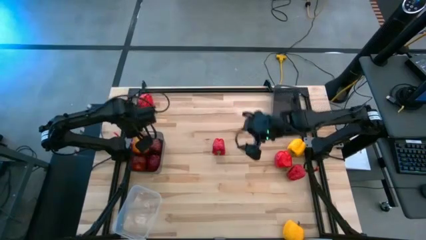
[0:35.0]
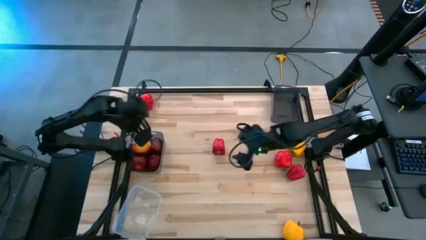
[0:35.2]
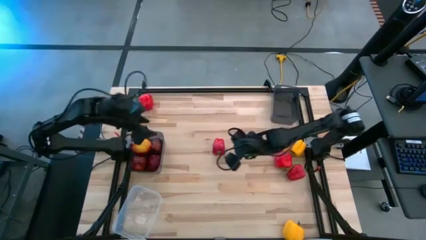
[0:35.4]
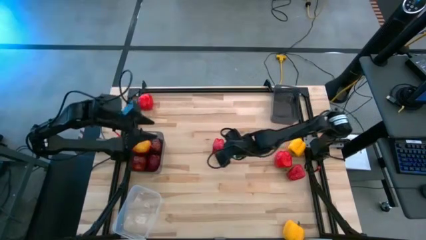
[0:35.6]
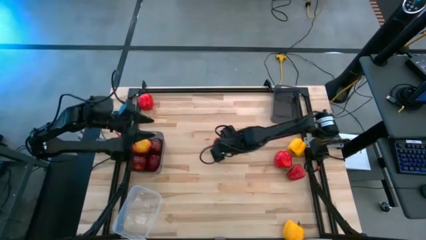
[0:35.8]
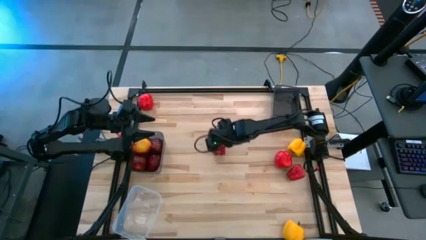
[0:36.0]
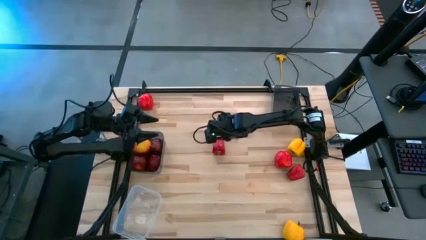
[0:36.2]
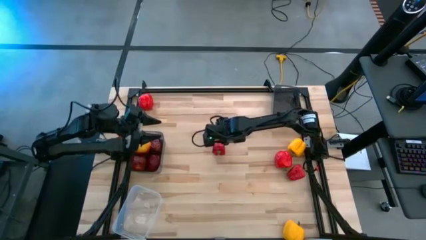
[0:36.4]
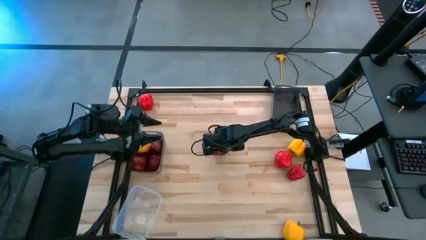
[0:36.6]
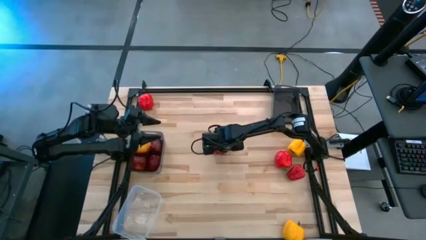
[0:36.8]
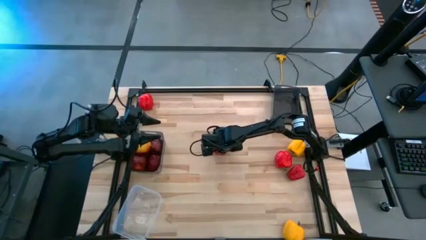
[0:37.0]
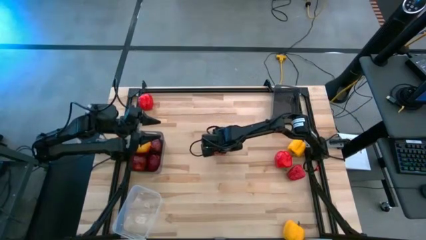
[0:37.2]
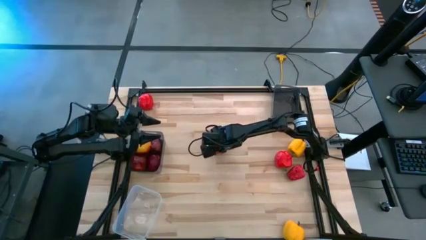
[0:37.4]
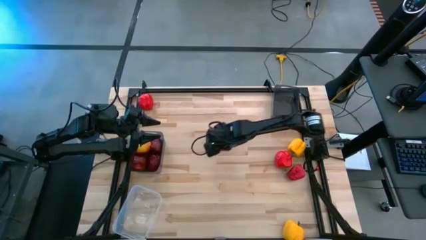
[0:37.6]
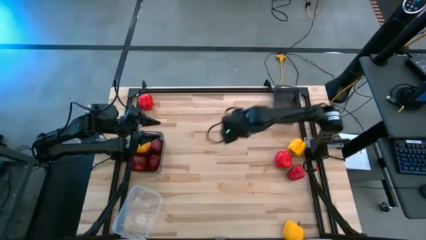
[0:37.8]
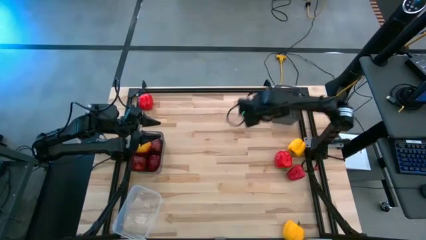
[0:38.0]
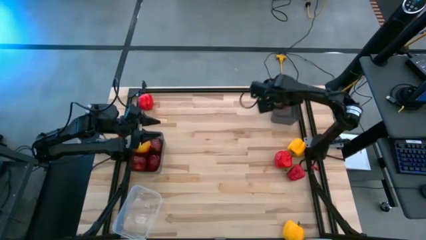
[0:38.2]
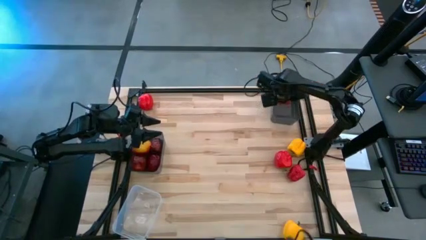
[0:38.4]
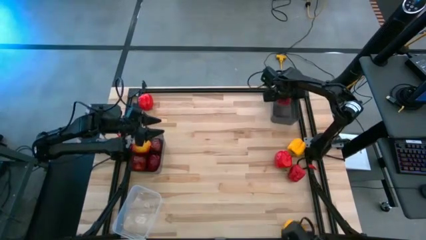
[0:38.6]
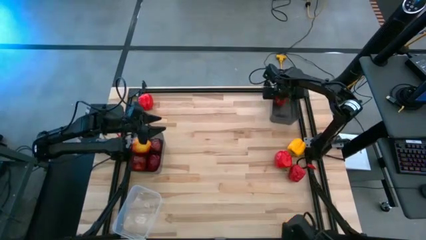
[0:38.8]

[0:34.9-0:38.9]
Task: Sort produce into baskets
Put the red bell pepper into the right black transparent bin

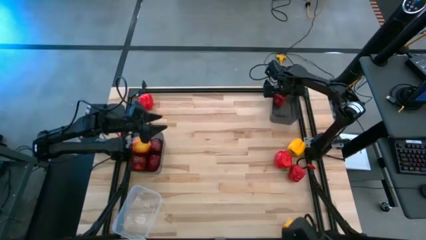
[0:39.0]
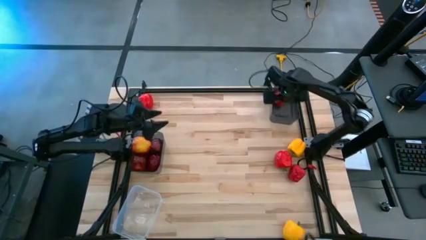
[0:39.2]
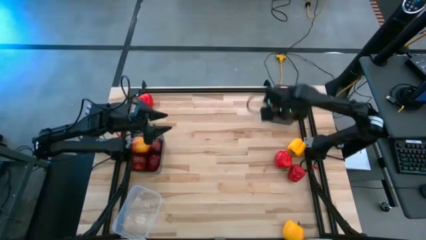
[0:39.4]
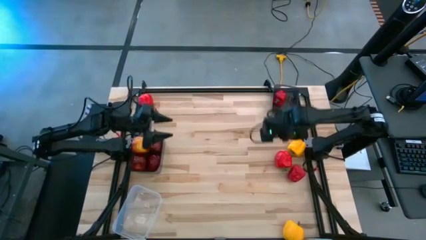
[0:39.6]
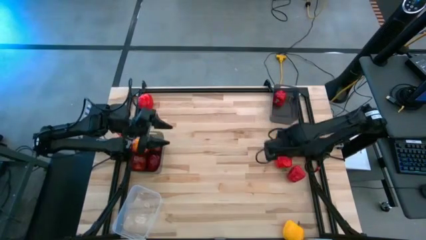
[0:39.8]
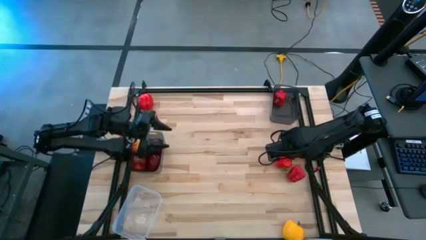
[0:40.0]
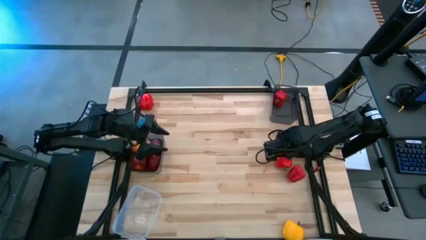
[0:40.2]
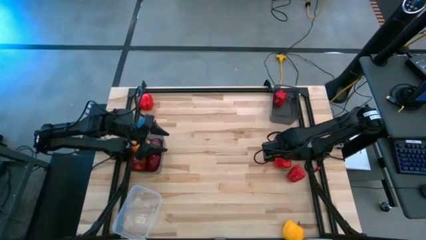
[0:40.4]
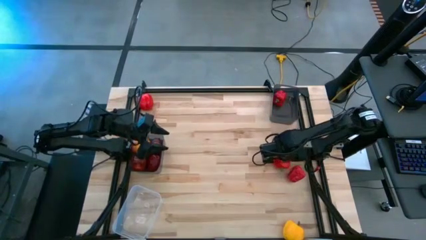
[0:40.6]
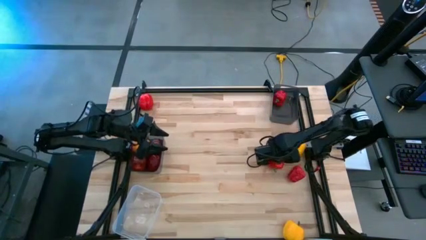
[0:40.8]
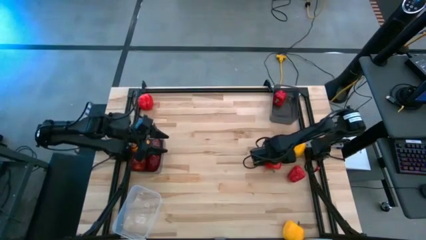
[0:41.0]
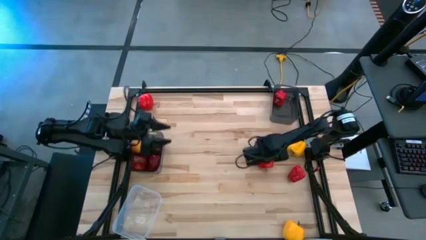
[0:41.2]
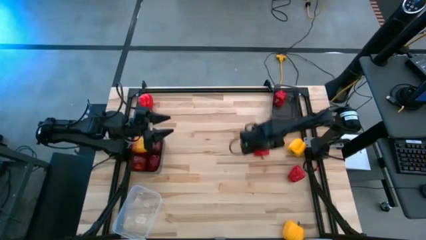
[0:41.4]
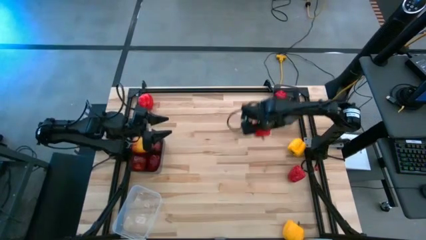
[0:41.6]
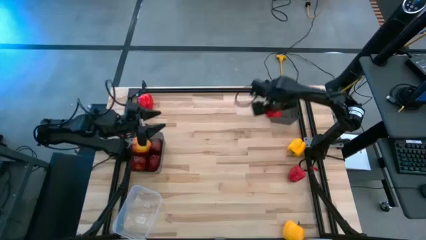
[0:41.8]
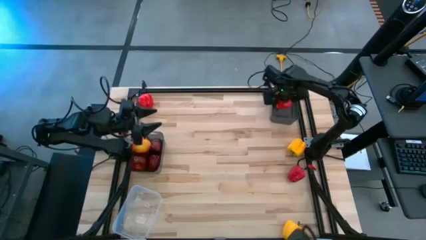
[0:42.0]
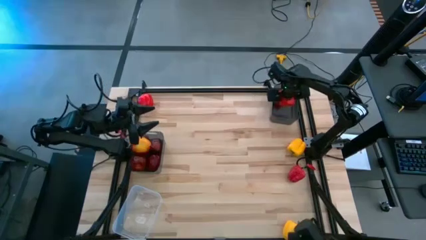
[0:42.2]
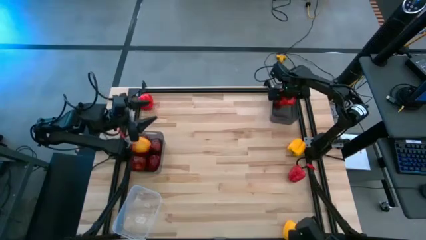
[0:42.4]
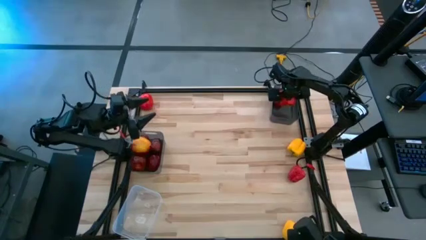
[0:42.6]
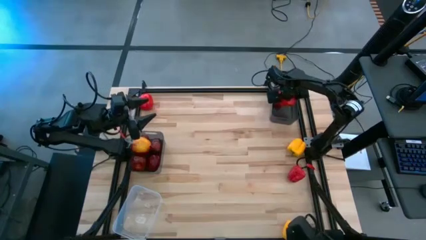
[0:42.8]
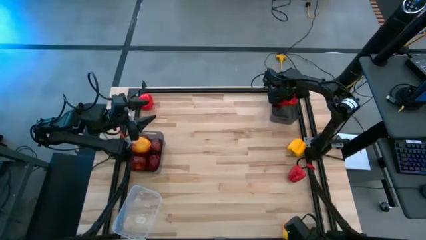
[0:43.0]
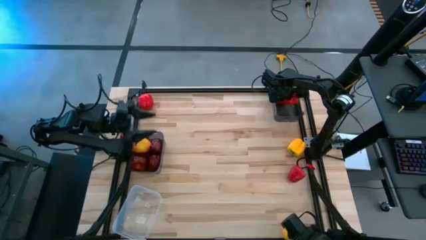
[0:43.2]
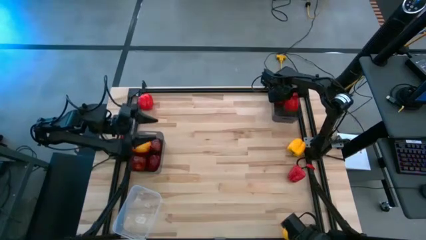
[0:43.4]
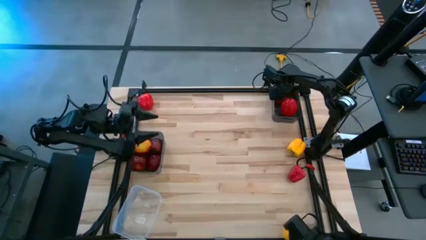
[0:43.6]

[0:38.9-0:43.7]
Put the red bell pepper into the right black transparent bin

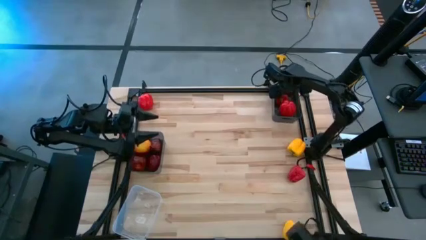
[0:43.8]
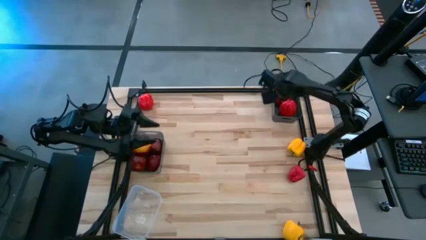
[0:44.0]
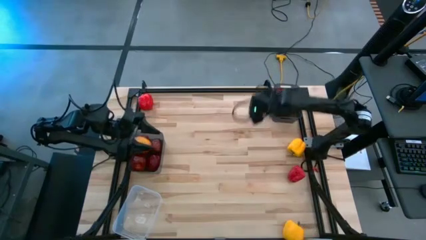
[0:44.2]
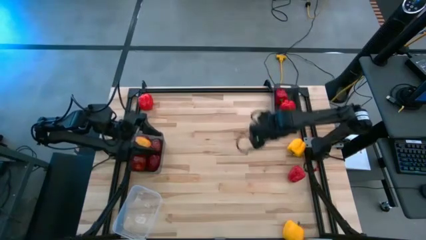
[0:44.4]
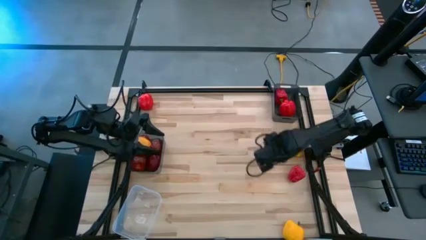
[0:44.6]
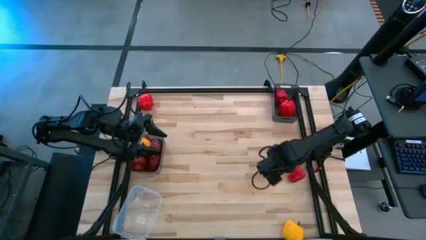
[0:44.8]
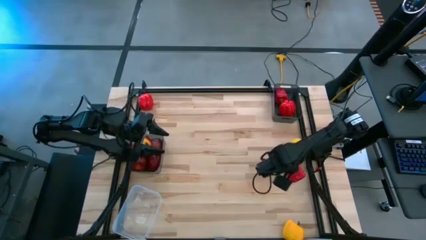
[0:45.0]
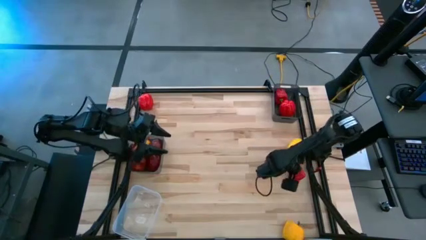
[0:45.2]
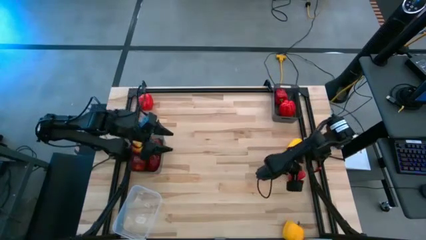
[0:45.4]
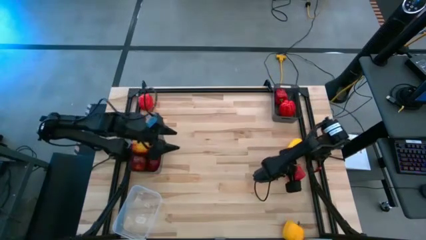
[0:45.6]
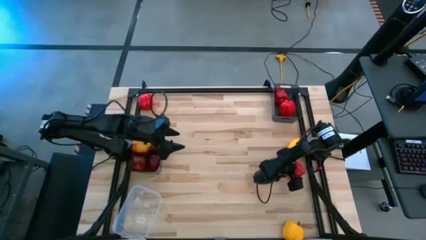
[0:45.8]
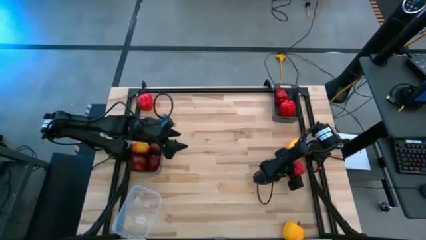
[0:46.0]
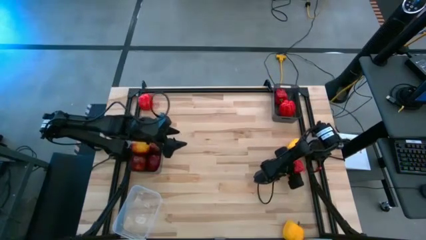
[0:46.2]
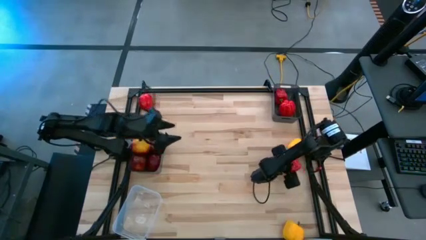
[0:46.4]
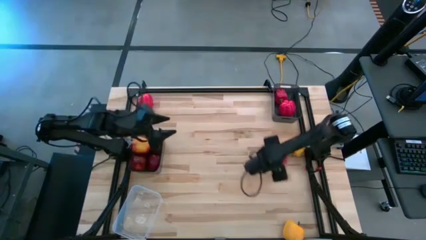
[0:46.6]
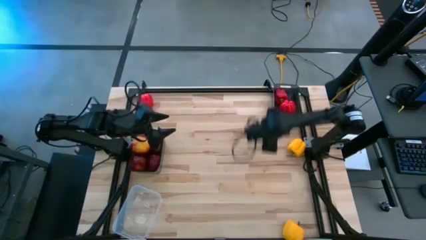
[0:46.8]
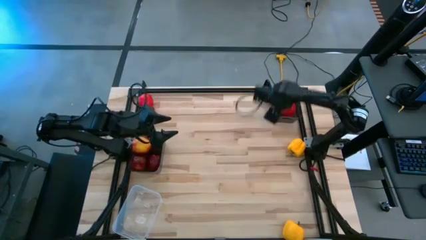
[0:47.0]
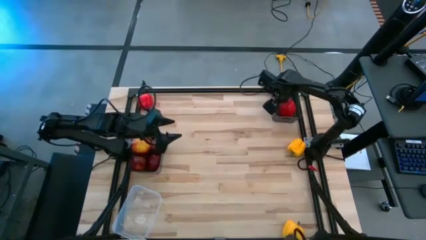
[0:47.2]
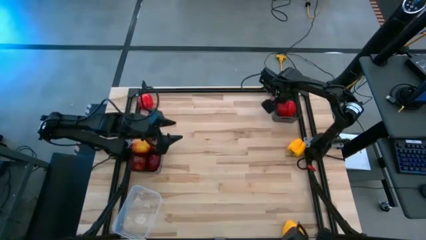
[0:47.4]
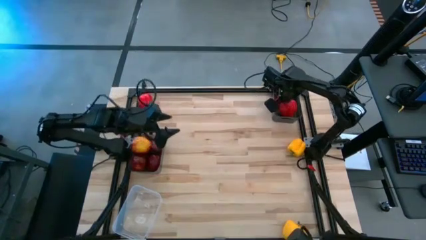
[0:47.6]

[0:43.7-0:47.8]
Put the red bell pepper into the right black transparent bin
